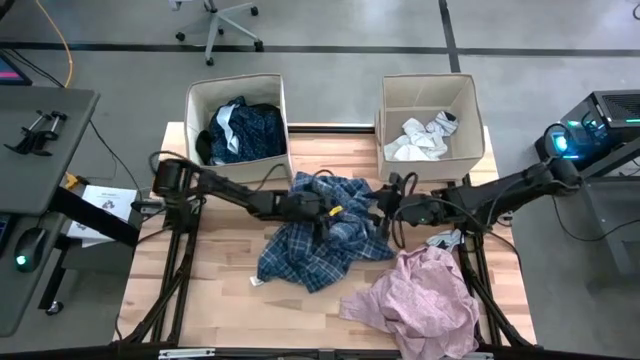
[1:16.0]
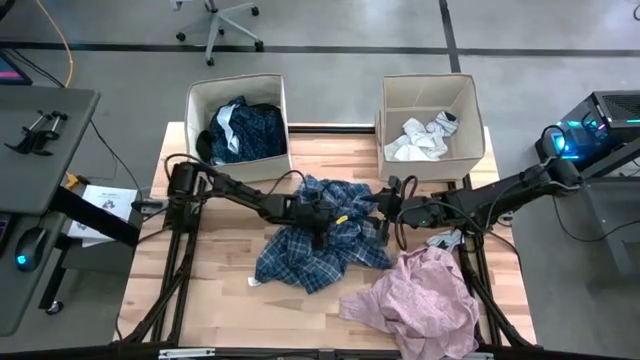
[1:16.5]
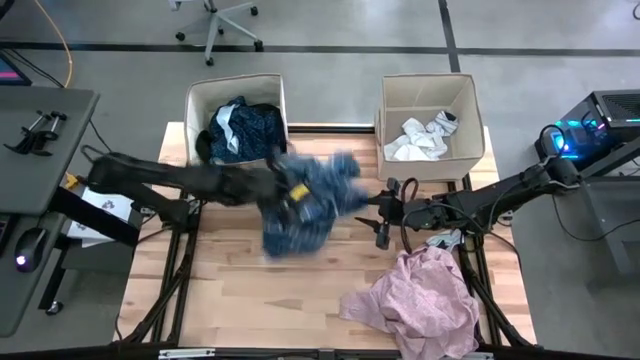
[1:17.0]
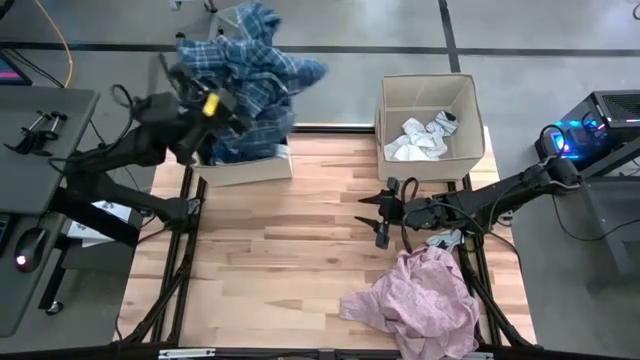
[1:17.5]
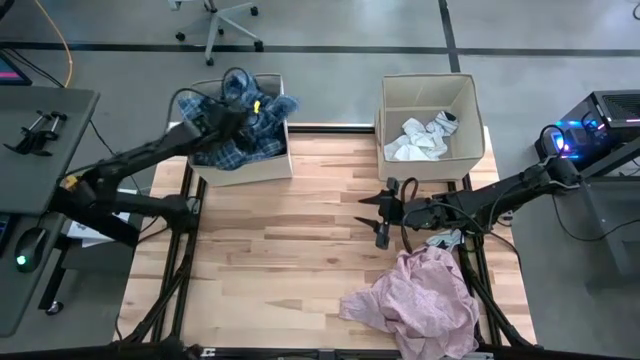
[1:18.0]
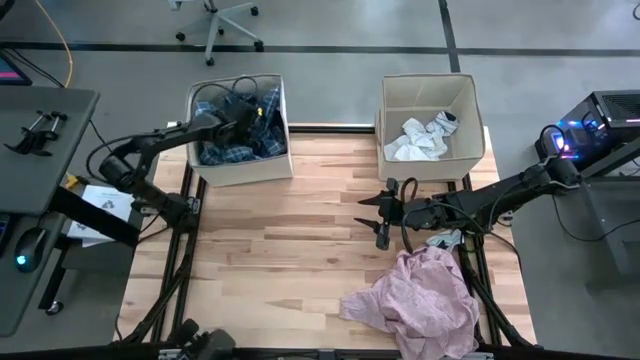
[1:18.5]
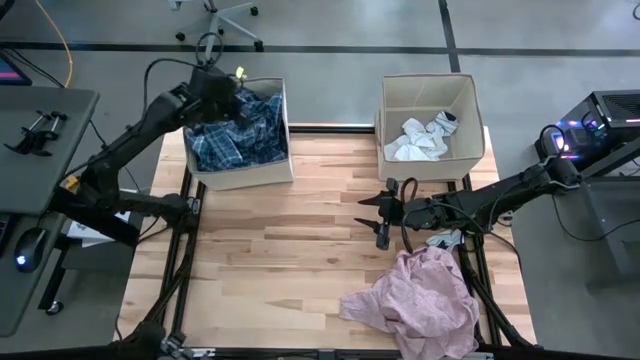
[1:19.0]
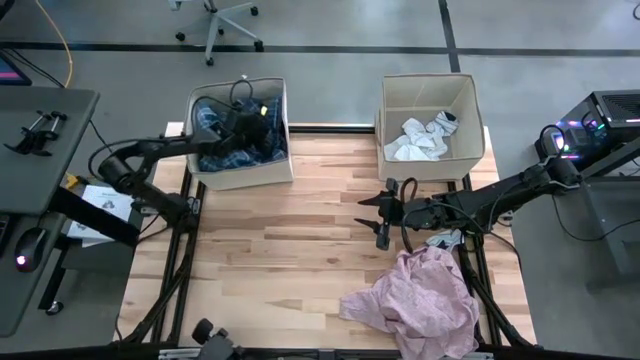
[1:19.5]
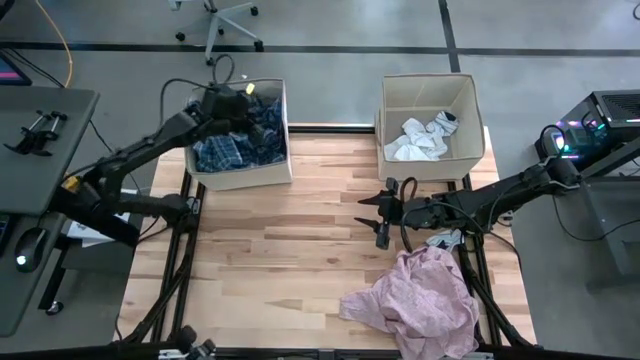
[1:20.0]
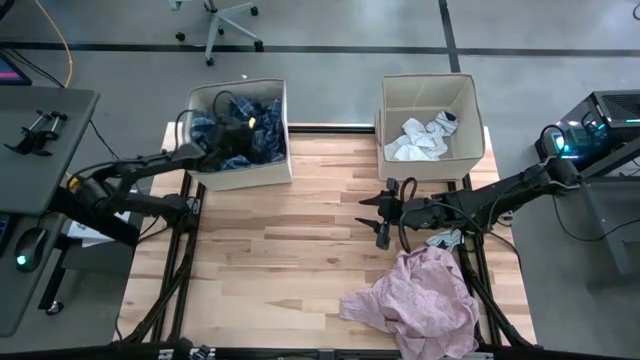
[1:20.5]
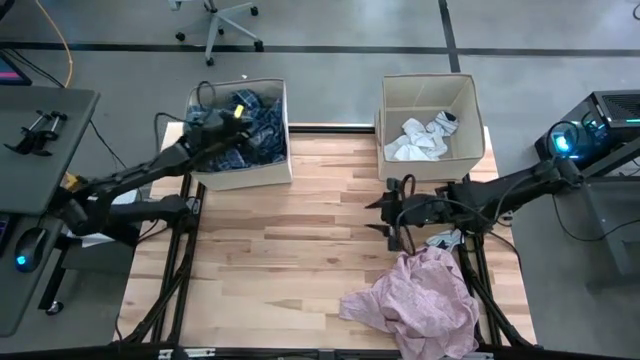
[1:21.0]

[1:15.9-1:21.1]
Task: Sort clothes
Put the blue shirt into the left laundry bin

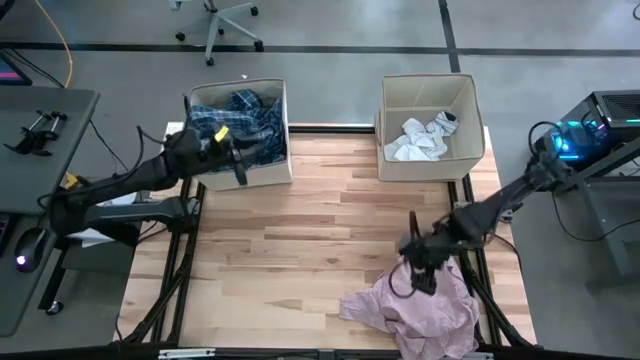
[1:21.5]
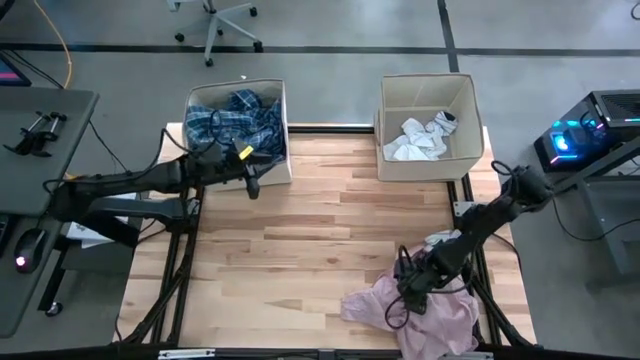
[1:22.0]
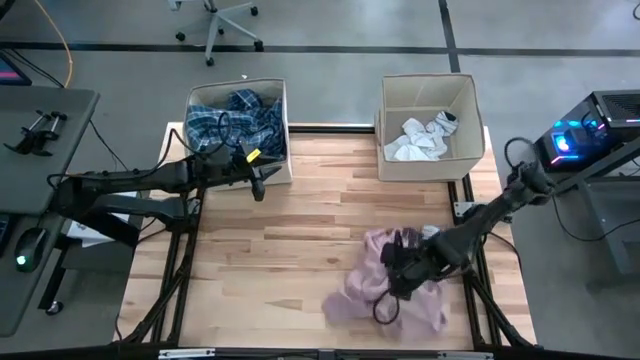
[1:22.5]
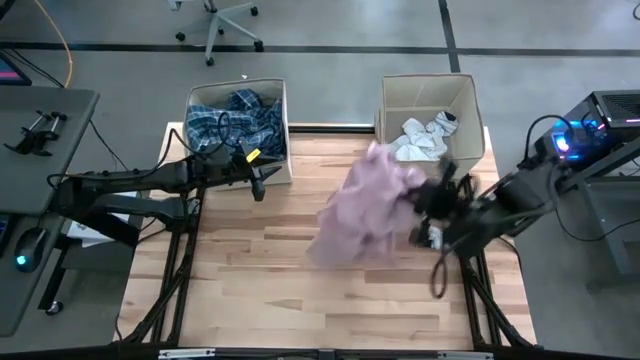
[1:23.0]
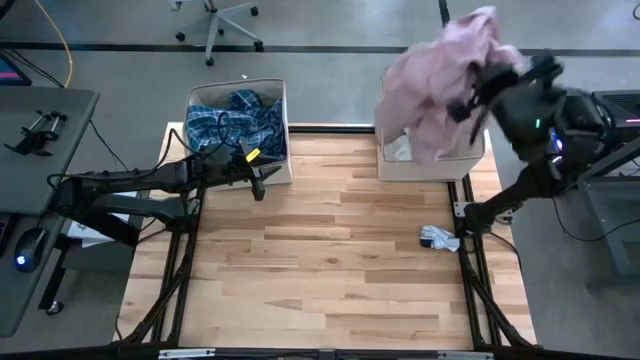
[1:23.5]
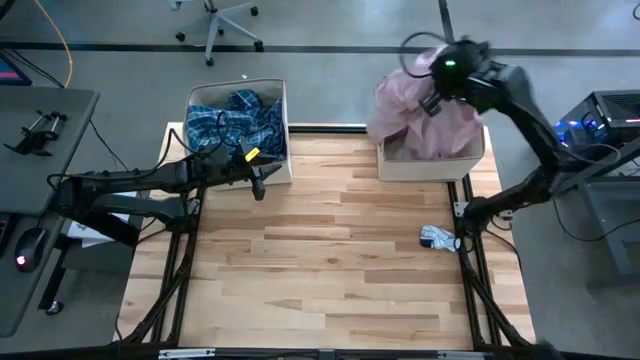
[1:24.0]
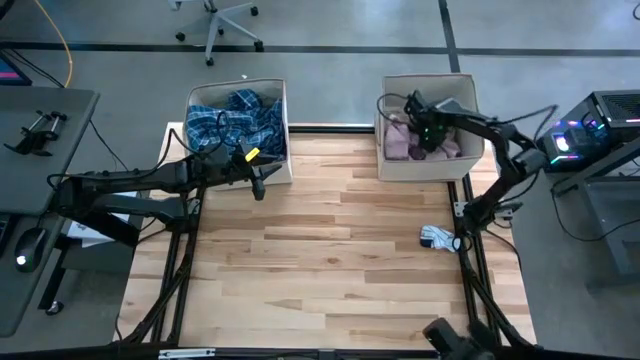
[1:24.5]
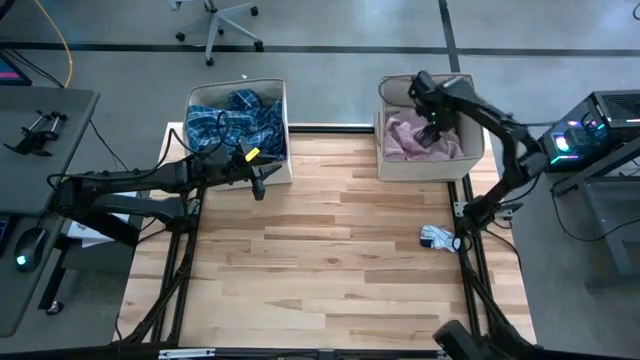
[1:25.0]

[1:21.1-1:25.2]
Put the pink shirt into the right laundry bin

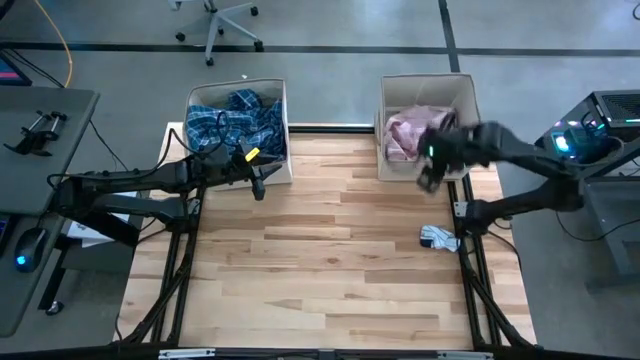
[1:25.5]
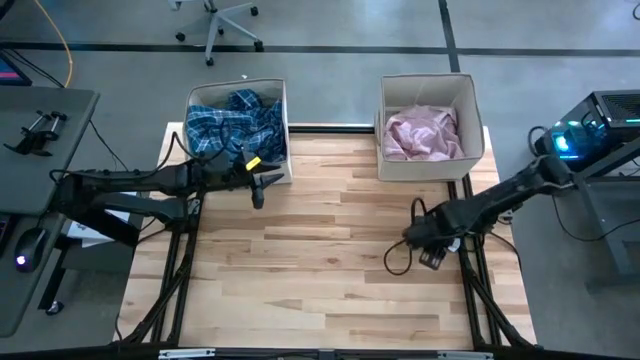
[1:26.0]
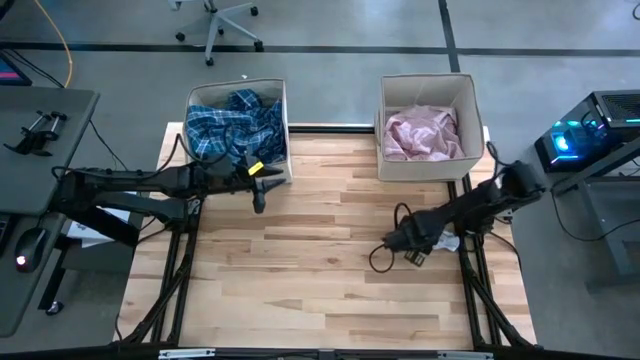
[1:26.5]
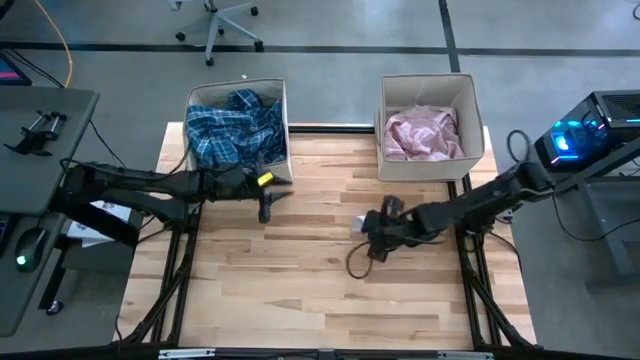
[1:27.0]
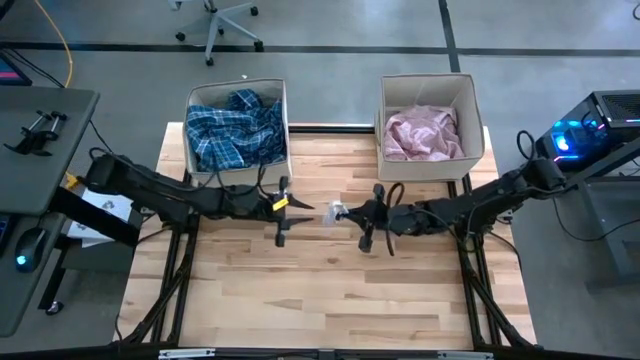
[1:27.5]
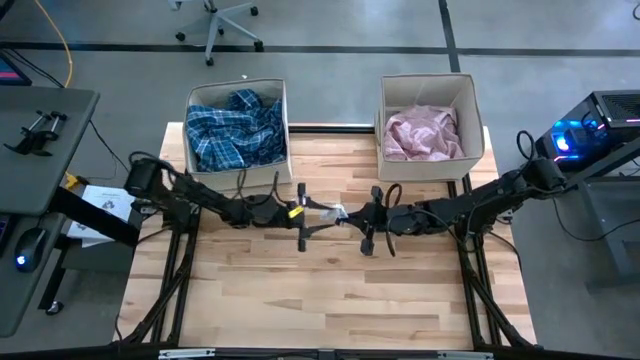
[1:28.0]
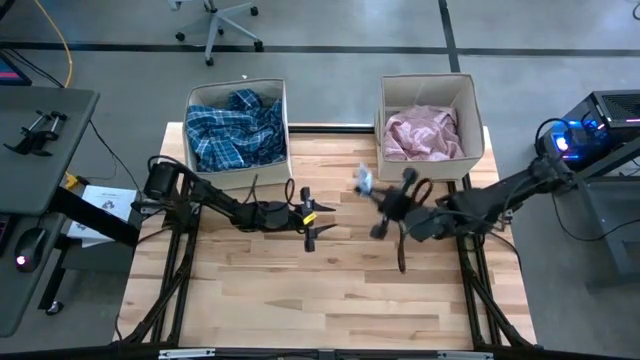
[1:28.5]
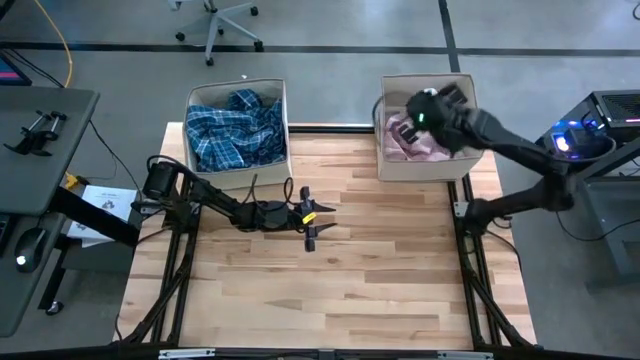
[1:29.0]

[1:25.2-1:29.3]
Put the white stripe sock into the right laundry bin

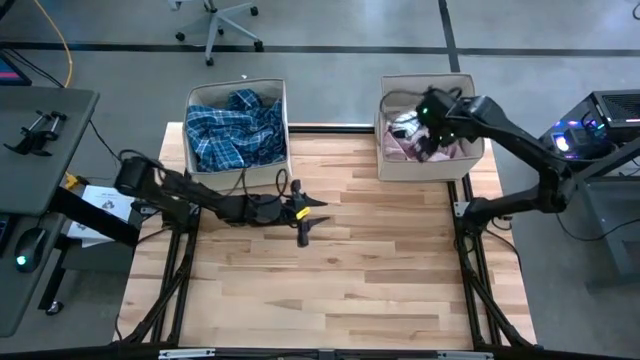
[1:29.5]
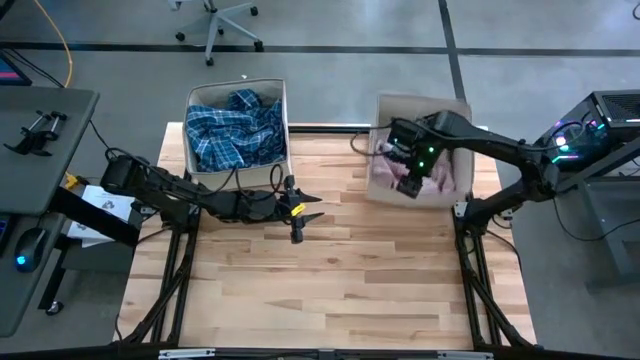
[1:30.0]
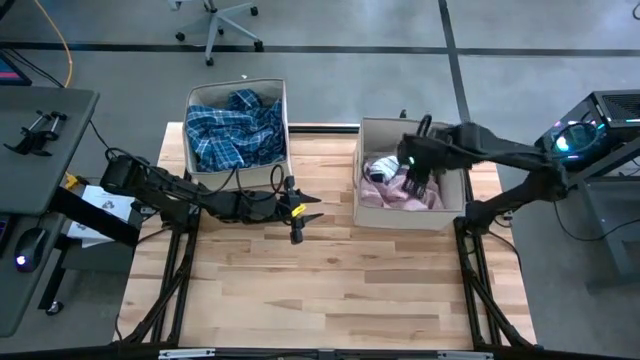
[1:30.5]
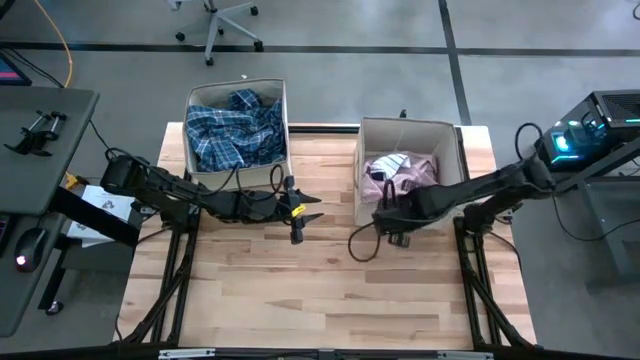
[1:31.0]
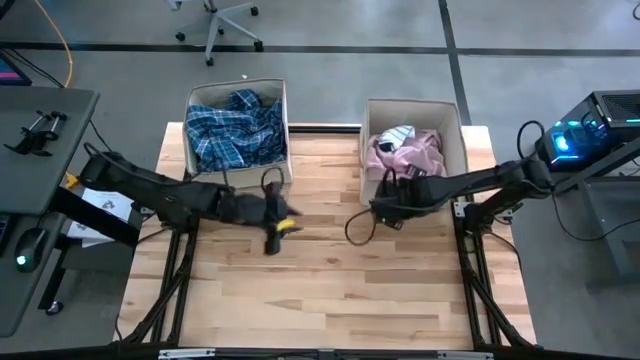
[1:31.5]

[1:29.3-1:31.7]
Adjust the right laundry bin

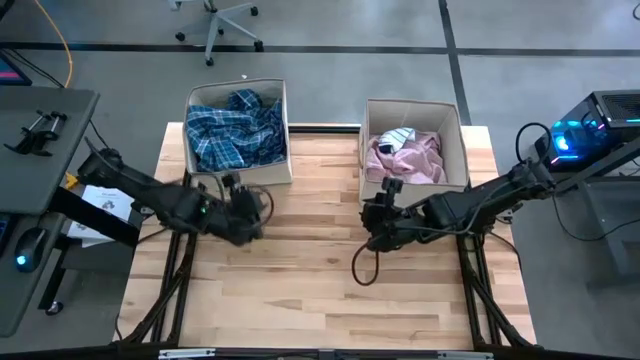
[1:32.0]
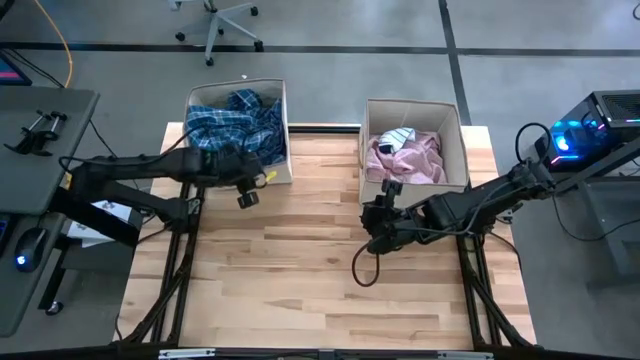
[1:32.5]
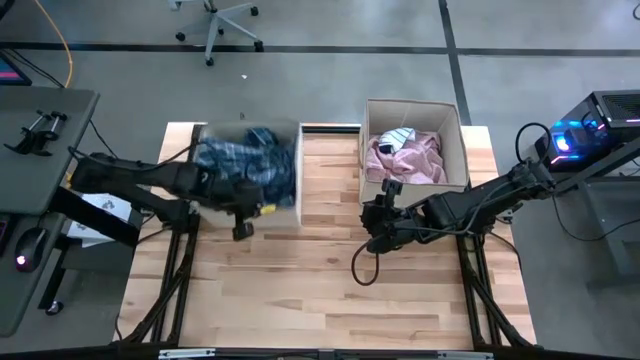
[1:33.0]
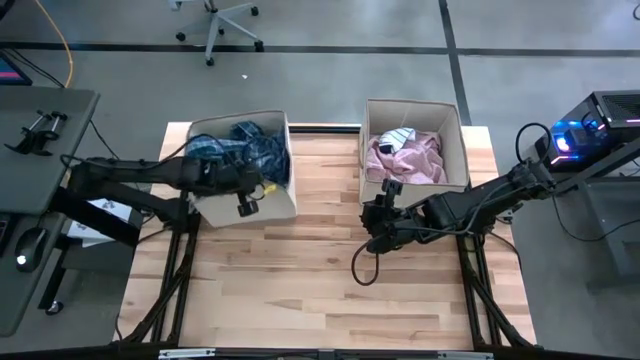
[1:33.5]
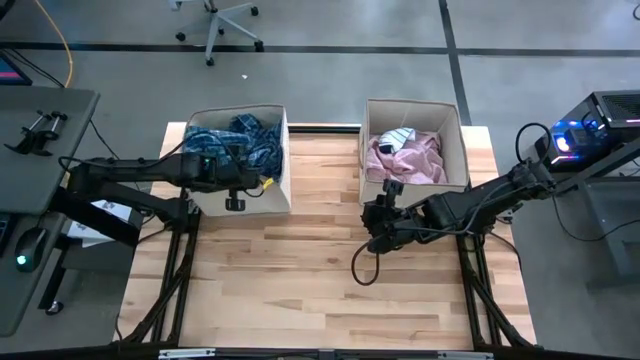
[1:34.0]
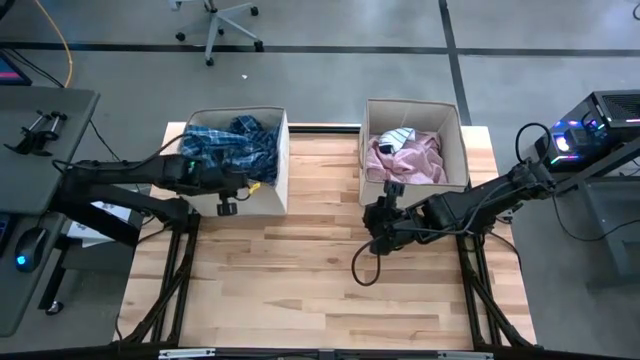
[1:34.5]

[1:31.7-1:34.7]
Adjust the left laundry bin

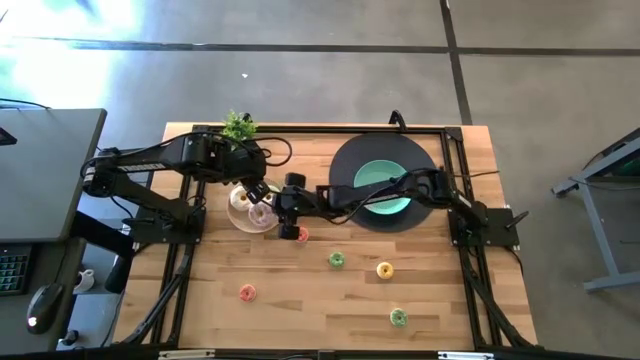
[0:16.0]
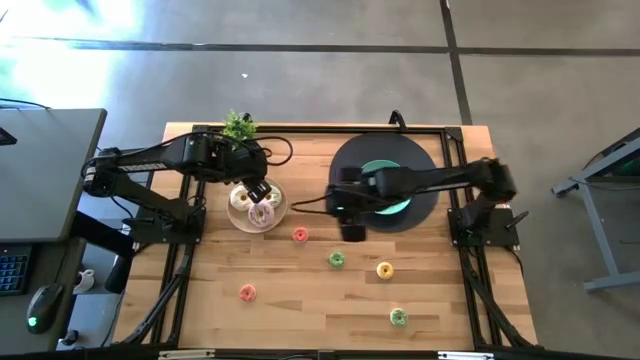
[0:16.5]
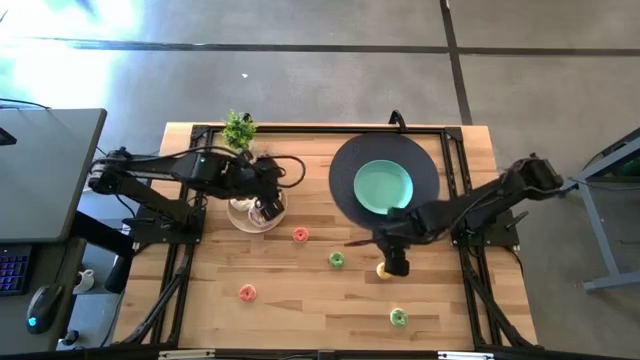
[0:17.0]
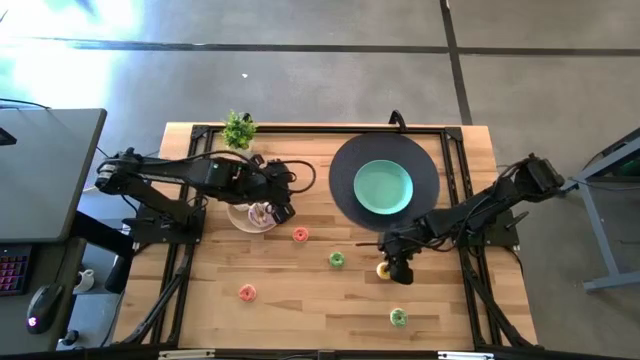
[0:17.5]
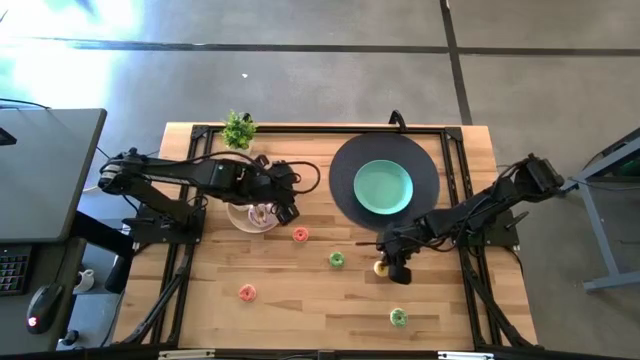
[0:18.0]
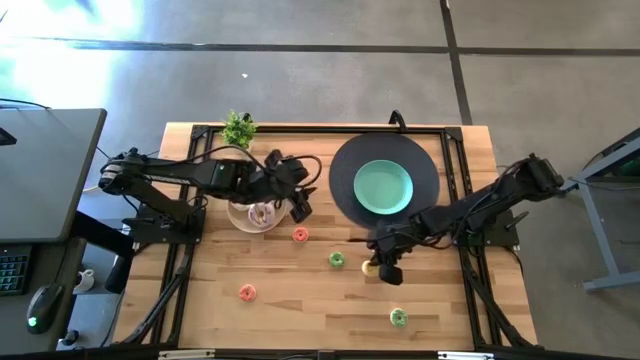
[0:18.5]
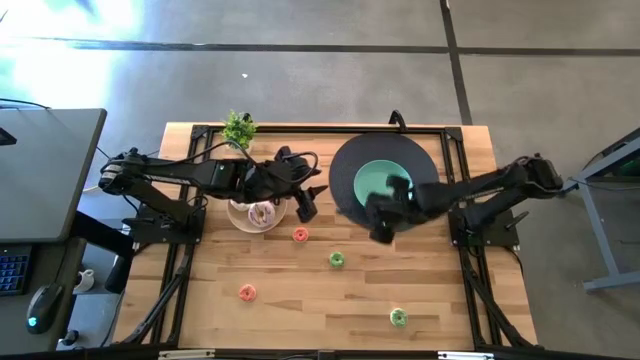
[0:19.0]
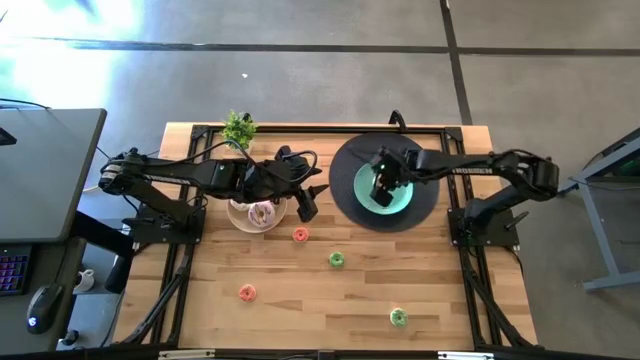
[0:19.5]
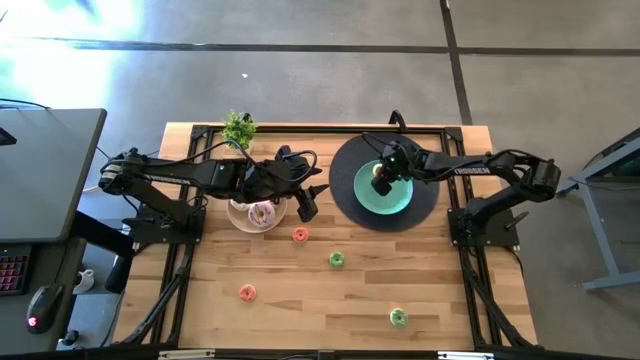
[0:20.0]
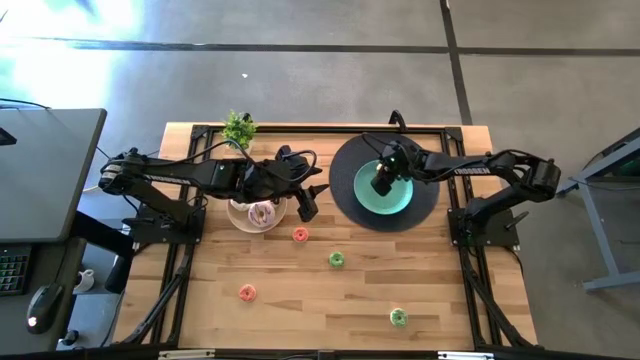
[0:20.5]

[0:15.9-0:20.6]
Task: Pick & Place donuts
Put the small yellow donut on the blue plate
